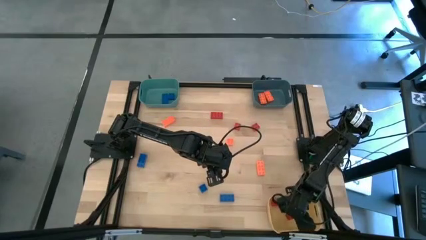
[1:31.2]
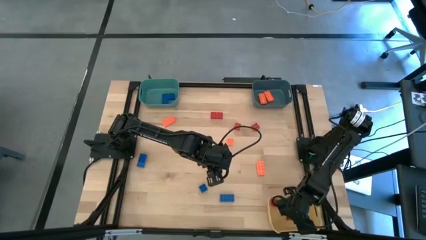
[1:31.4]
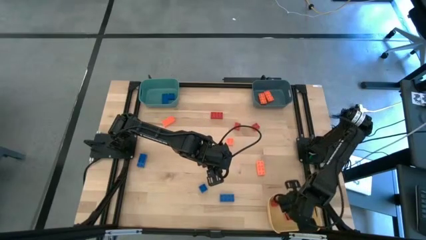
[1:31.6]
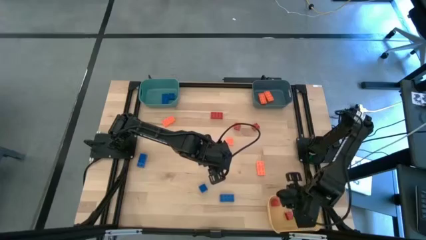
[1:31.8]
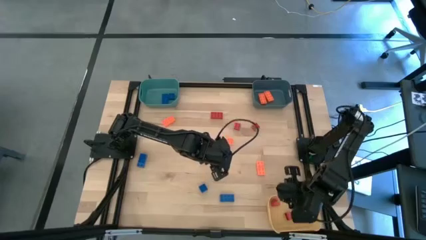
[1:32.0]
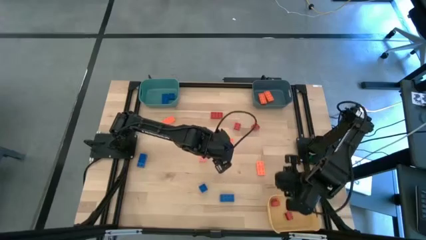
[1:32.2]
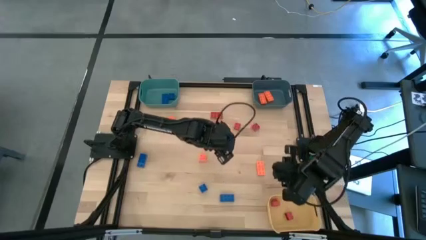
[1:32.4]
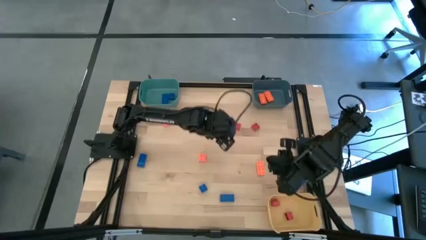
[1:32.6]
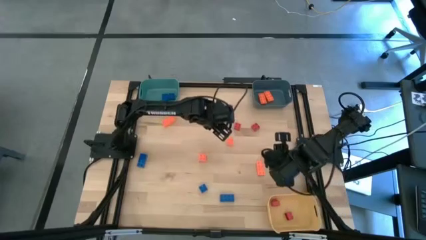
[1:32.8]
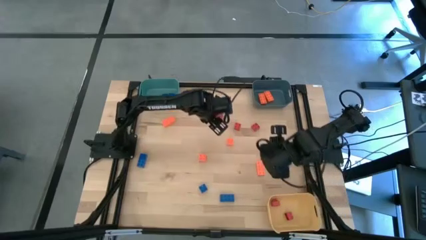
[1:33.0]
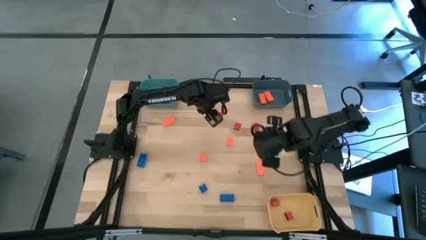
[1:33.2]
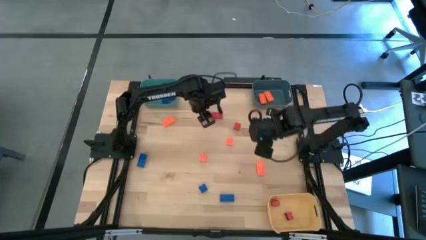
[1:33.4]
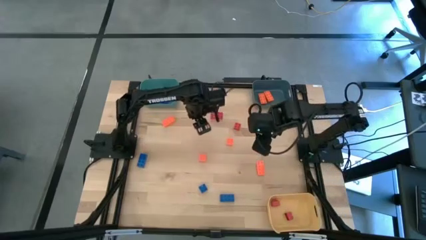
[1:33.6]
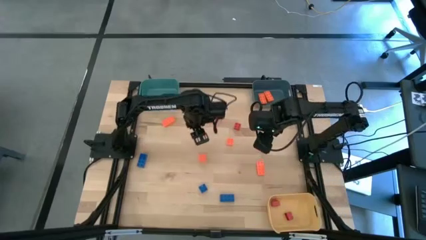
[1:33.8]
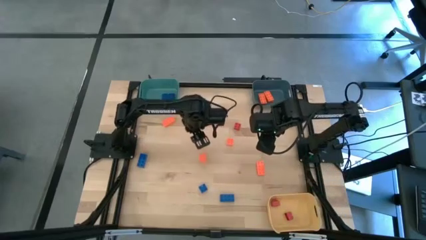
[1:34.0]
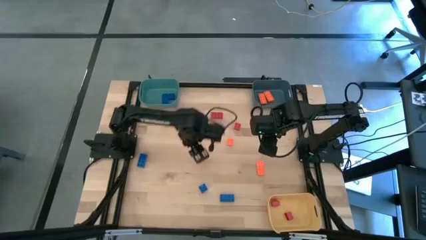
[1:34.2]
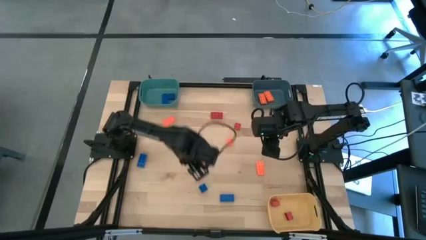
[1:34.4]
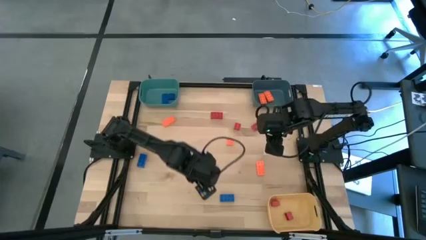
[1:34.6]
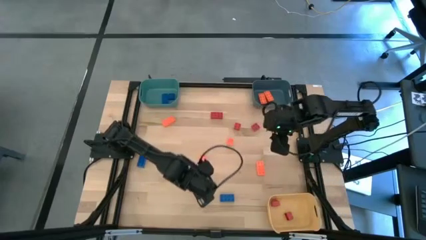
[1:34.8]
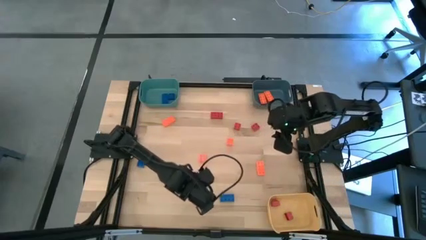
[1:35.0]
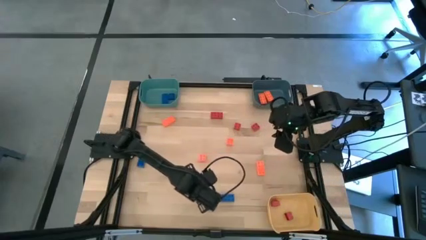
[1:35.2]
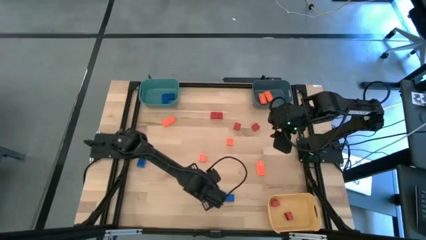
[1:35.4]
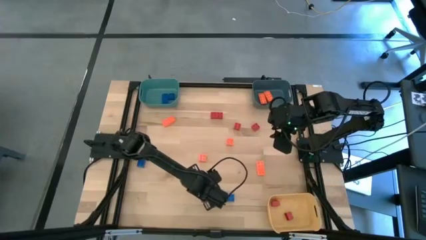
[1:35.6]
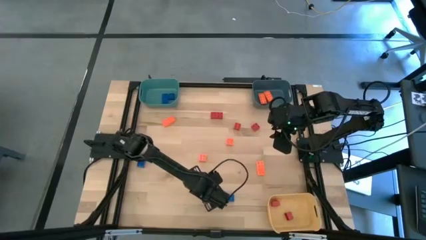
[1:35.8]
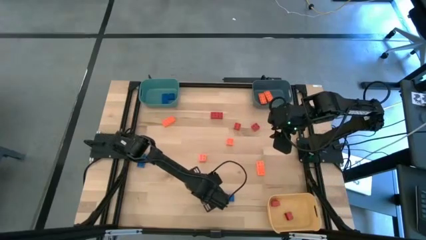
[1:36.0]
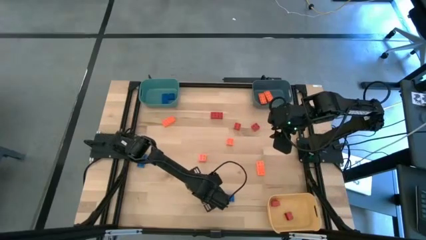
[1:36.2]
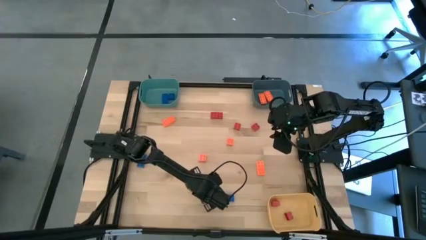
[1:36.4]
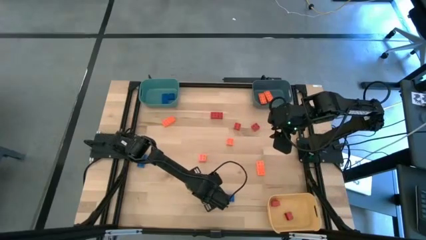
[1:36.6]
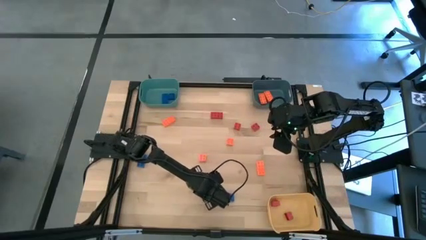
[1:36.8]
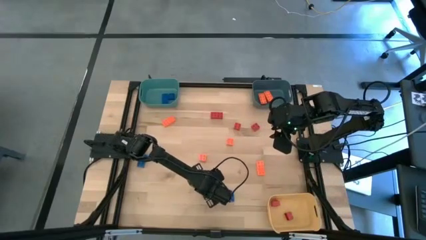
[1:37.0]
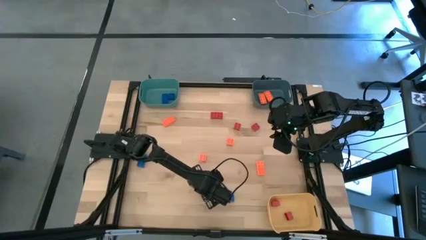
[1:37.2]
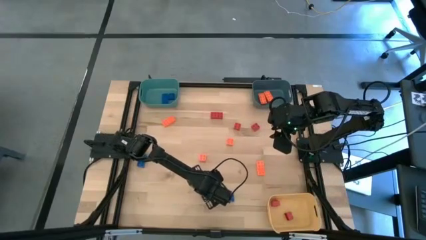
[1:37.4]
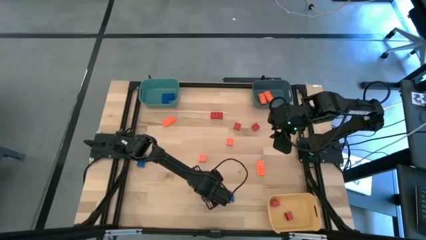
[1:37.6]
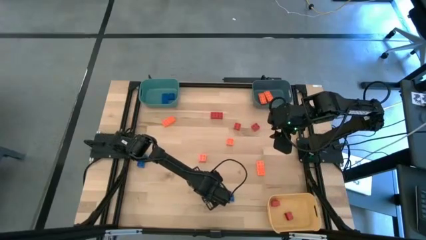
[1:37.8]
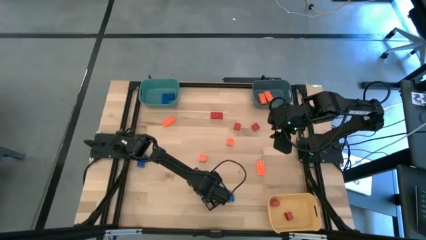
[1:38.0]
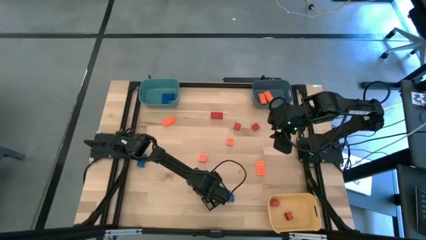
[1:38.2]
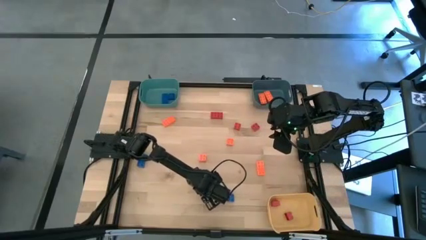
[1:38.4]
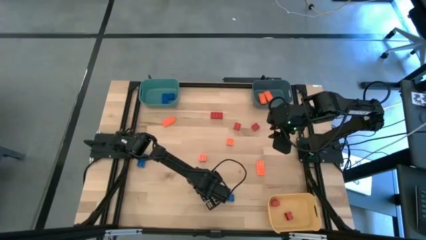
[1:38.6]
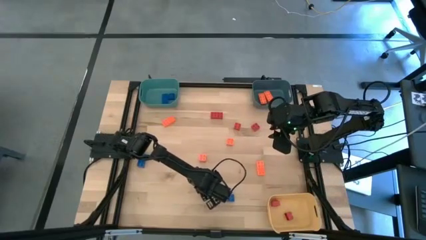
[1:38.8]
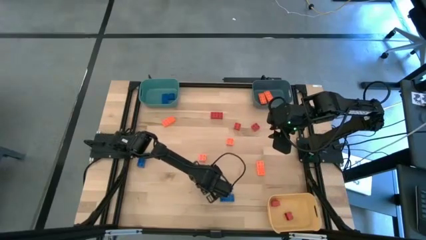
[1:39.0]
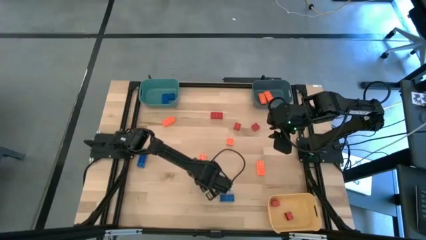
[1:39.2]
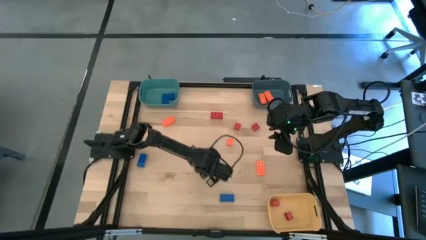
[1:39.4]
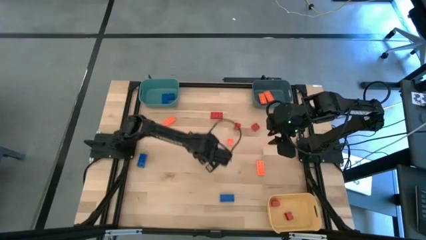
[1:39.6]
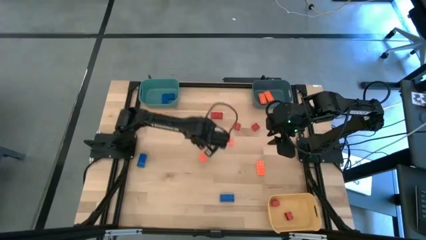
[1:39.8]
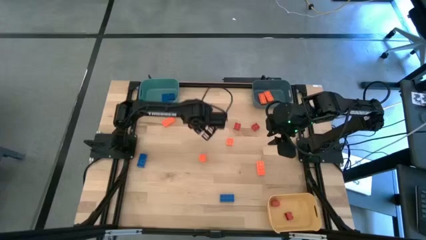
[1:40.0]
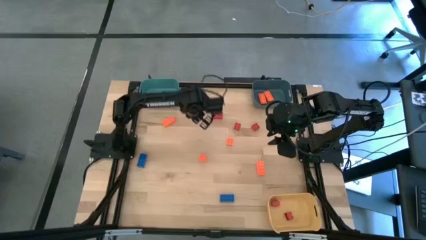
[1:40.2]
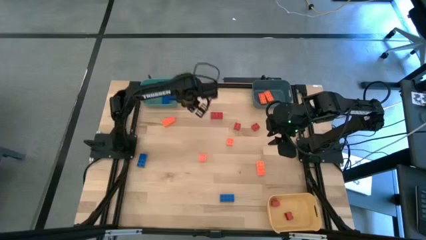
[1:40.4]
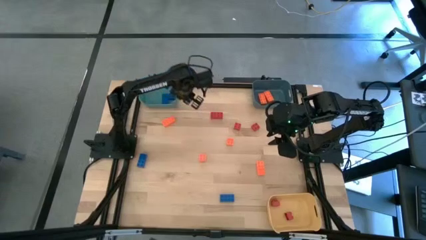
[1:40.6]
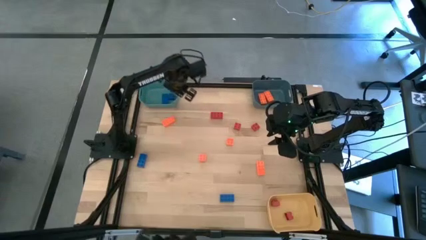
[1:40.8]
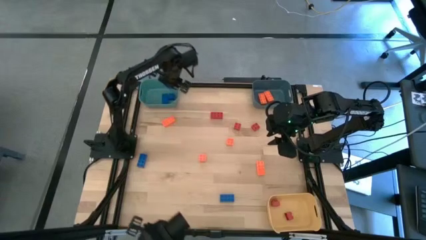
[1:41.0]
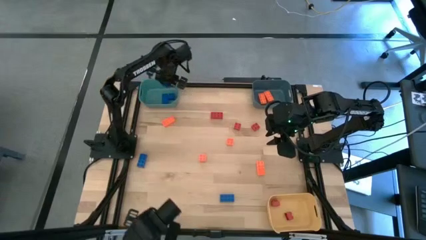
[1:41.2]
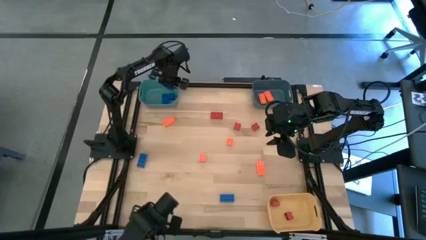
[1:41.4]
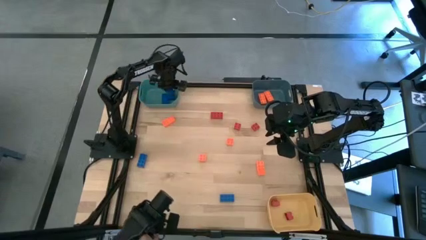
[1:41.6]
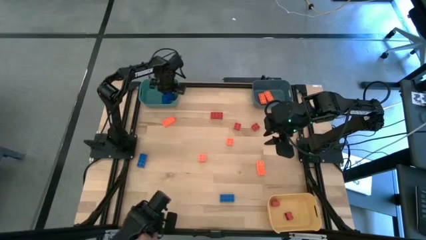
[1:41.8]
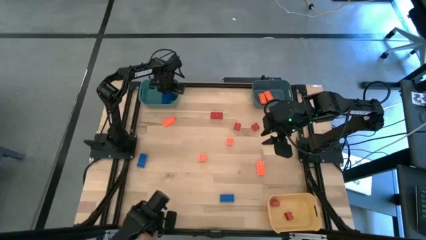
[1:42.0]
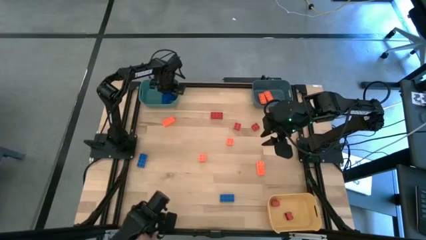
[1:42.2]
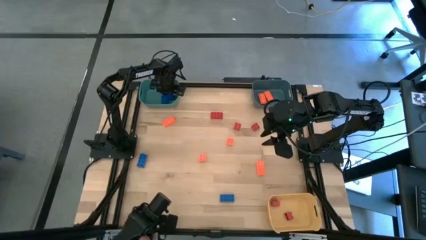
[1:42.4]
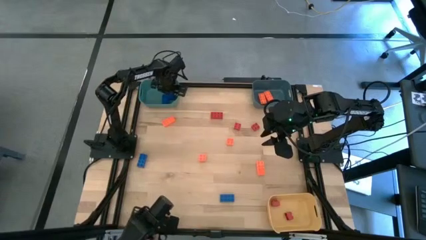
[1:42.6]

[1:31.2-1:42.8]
Task: Sort & place blocks by color
Put the blue game piece into the green bin
